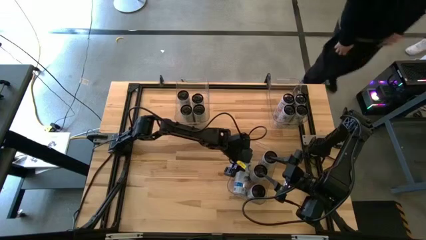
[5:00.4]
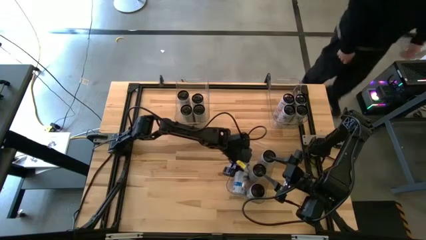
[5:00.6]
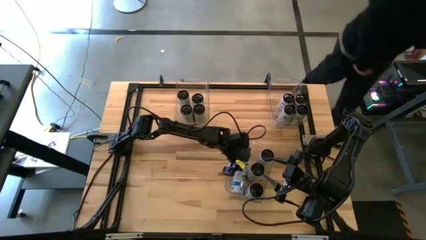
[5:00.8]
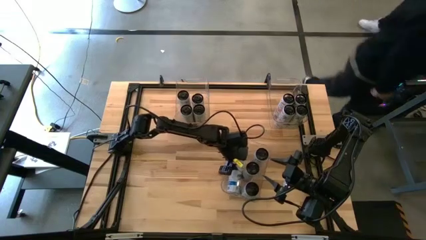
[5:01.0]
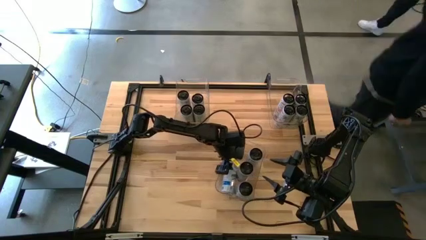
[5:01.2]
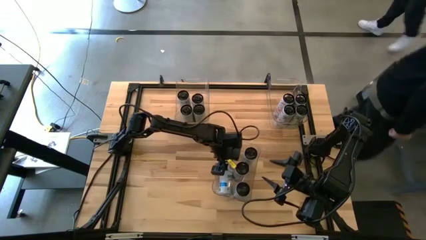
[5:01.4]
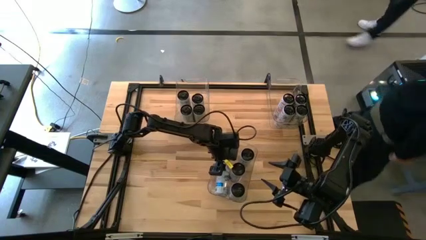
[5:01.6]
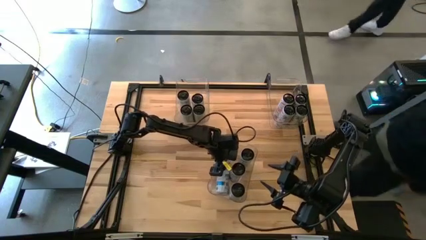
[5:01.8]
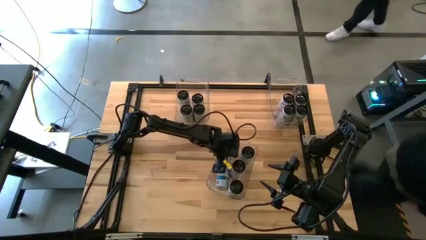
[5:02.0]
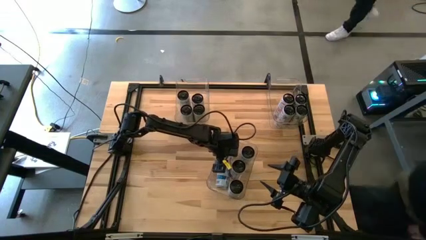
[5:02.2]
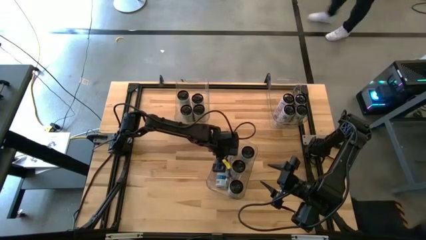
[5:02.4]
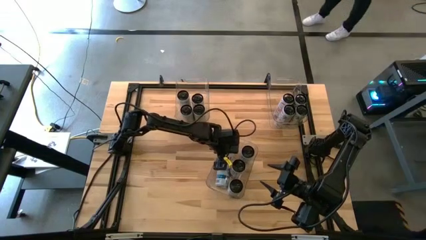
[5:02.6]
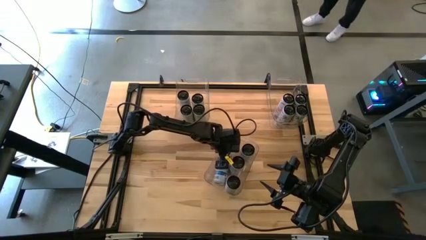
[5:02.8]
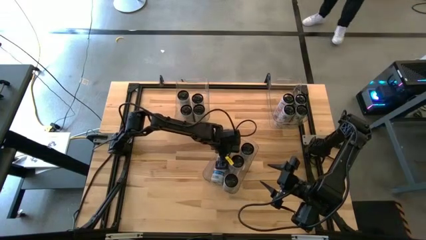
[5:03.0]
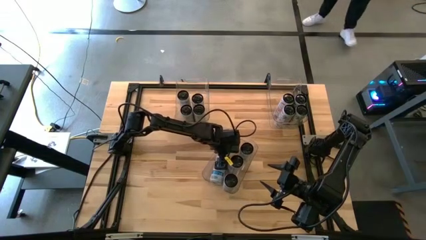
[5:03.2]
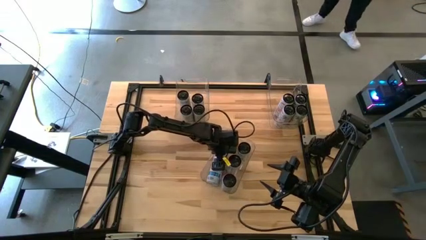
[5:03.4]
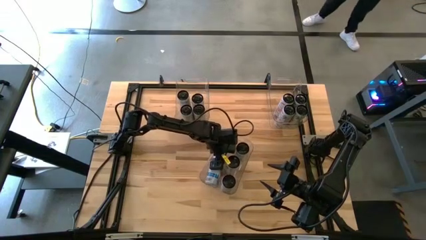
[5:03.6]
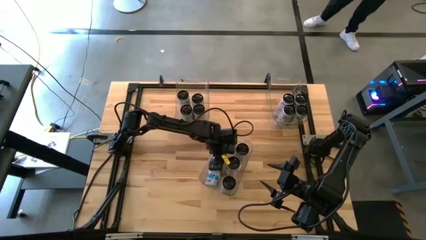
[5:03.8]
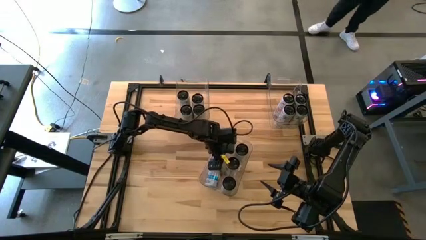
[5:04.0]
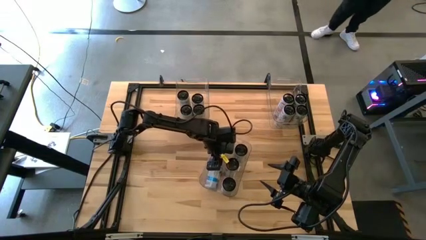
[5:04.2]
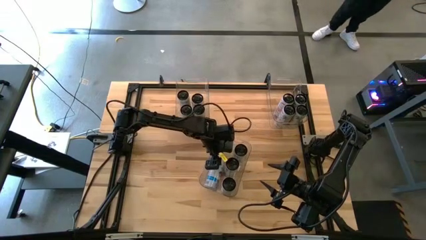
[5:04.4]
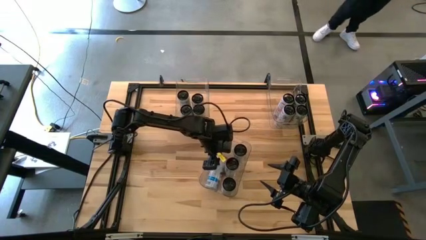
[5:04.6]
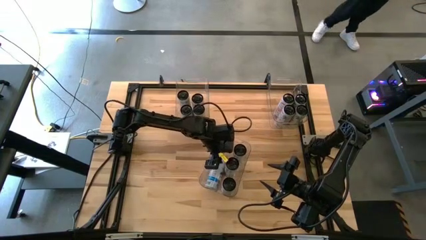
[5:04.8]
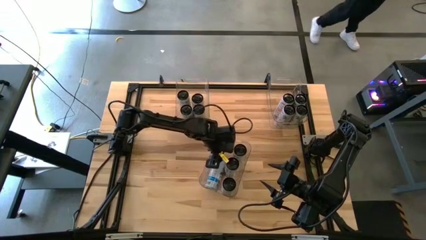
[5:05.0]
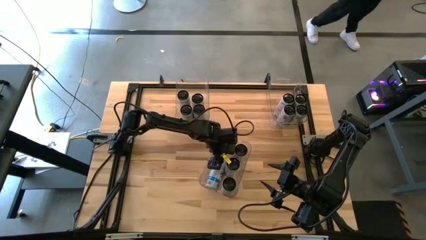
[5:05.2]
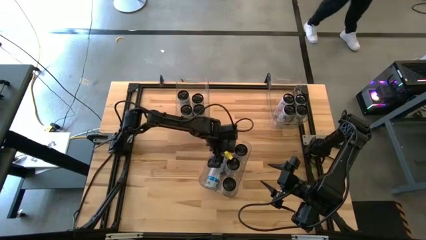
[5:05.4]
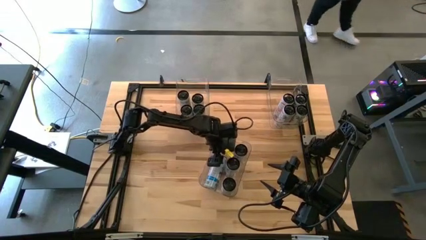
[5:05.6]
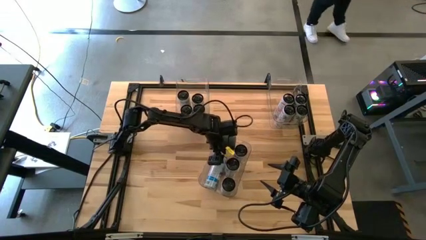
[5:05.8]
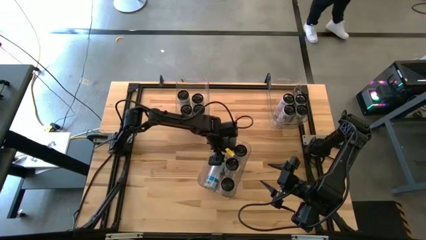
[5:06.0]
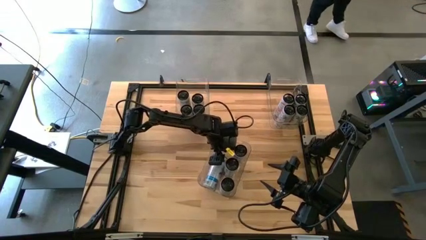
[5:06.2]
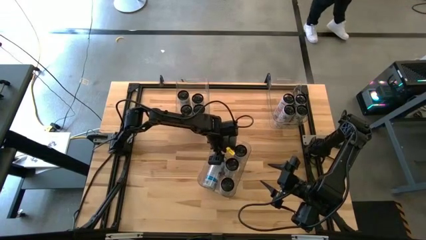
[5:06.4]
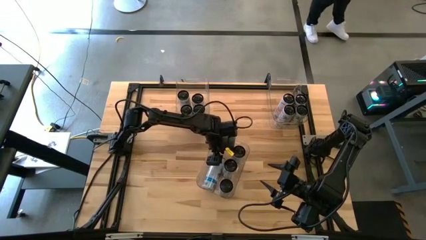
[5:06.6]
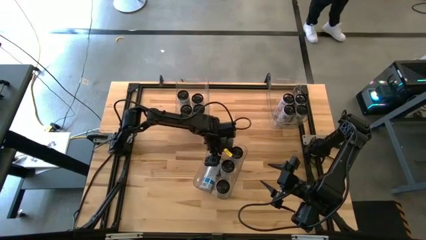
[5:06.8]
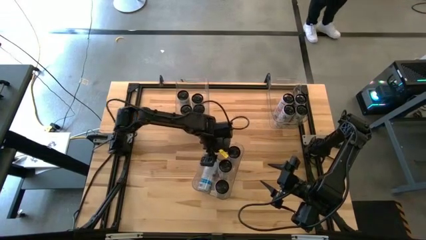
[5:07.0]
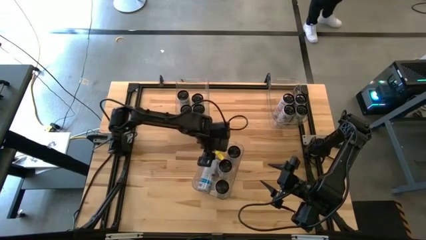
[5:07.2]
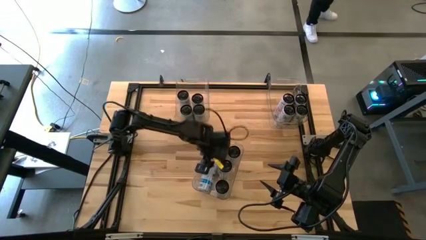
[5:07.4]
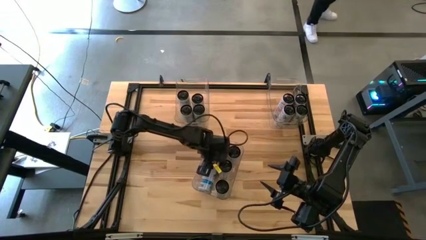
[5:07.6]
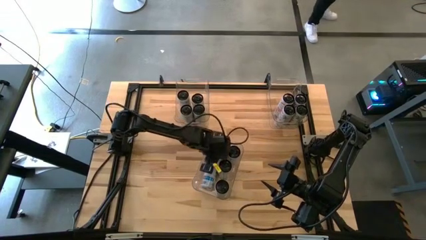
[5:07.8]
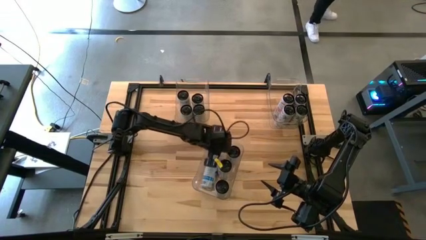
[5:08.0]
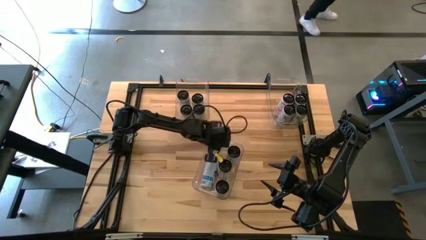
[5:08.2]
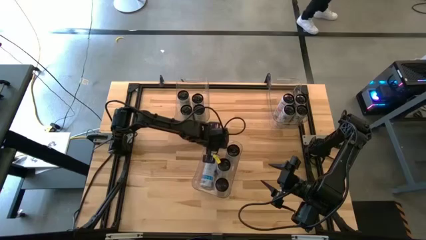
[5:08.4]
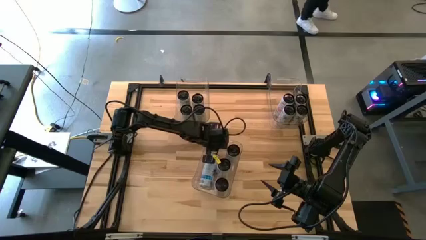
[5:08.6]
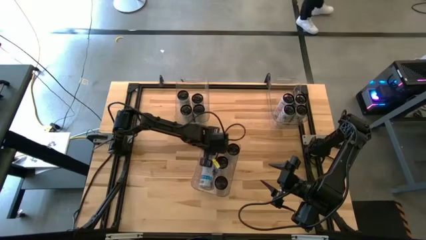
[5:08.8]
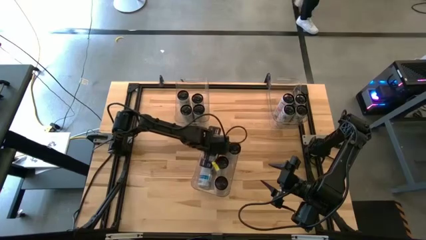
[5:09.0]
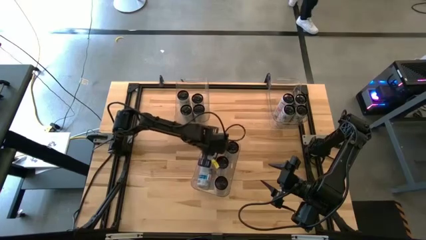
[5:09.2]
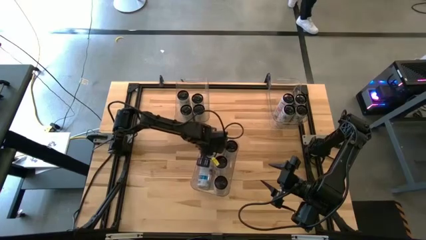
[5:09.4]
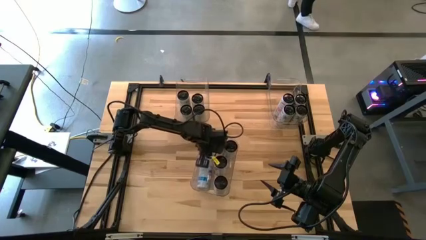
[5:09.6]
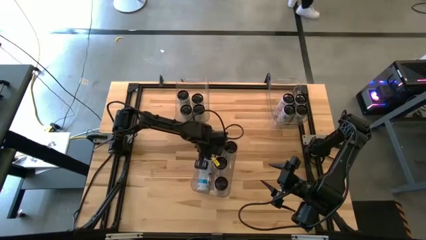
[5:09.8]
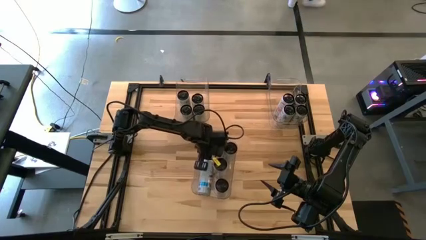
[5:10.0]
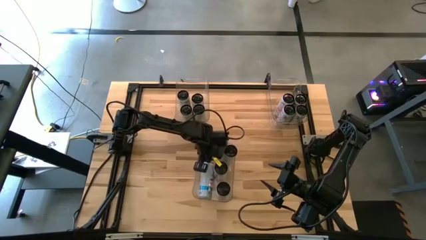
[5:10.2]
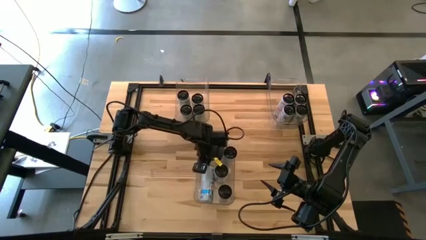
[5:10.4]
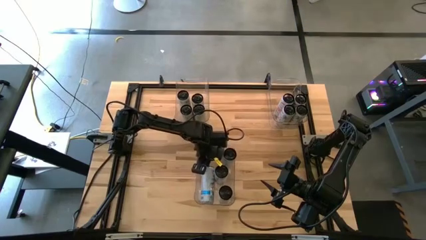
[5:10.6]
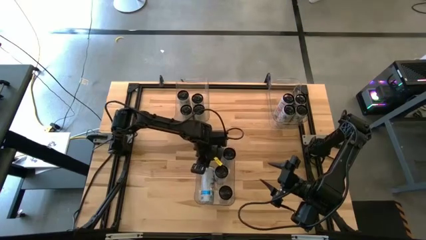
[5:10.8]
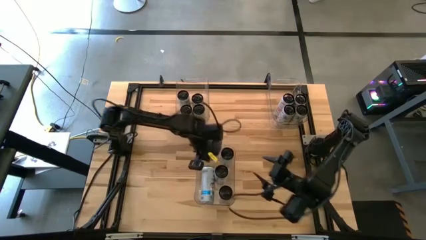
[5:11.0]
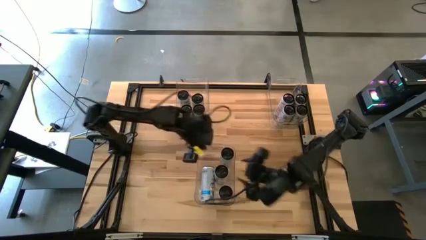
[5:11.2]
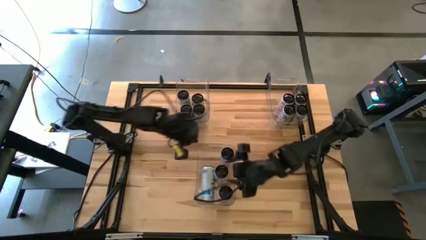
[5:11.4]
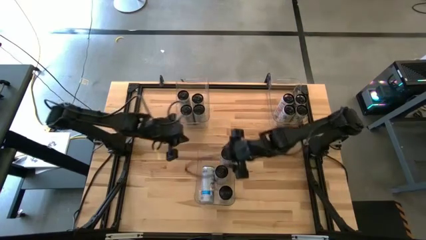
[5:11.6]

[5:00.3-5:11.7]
Task: Sort soda cans
Adjust the white/blue soda cans

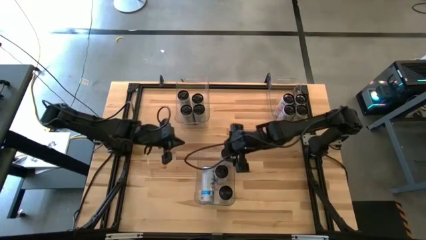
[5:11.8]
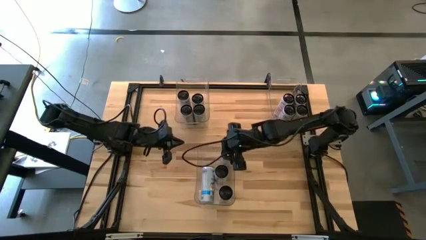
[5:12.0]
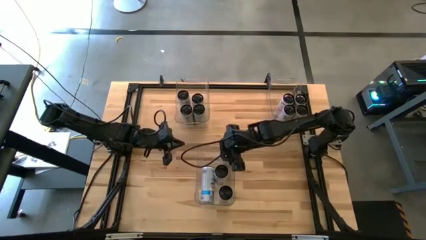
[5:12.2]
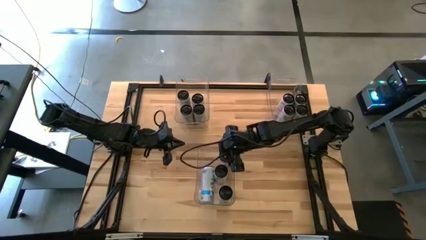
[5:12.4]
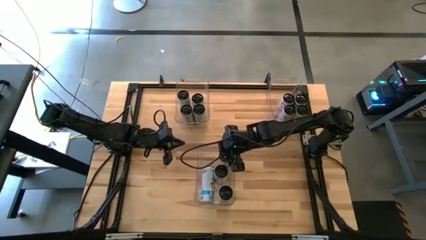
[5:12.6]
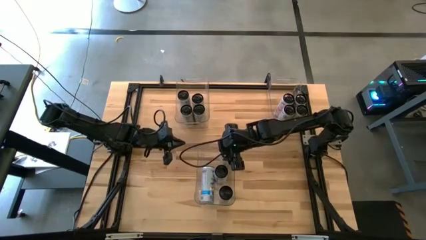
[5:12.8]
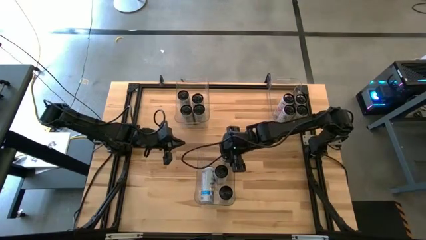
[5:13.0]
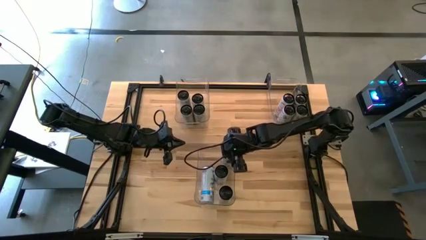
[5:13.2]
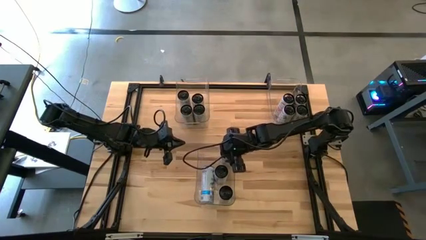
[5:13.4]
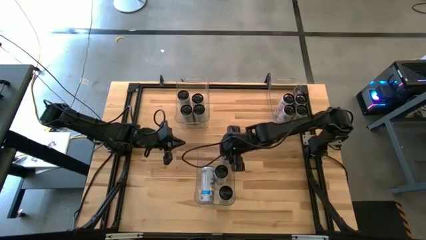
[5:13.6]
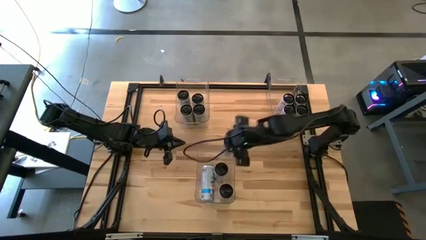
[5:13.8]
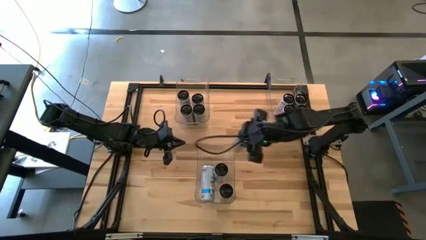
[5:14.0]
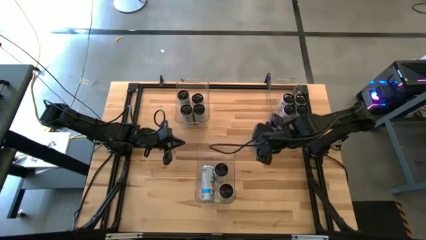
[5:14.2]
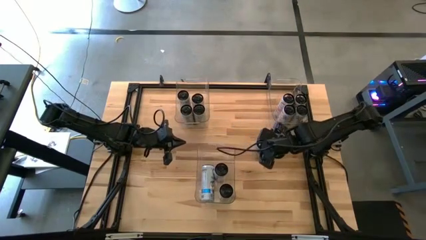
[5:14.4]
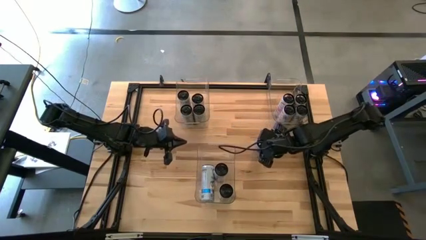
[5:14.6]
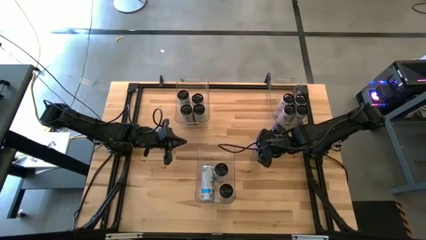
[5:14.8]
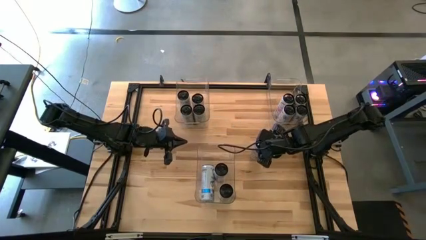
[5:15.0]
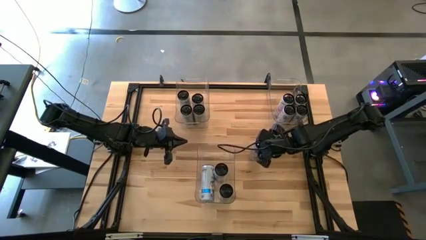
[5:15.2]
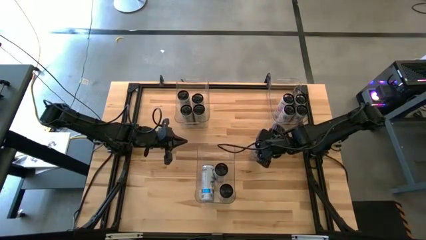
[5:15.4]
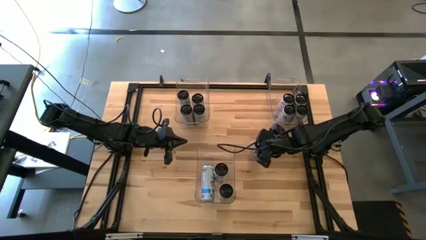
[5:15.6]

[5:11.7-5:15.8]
Remove the white/blue soda can from the transparent bin

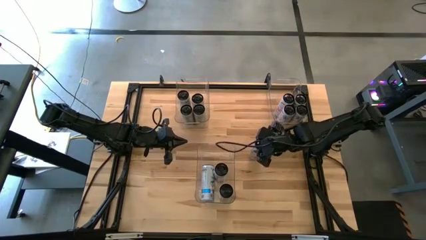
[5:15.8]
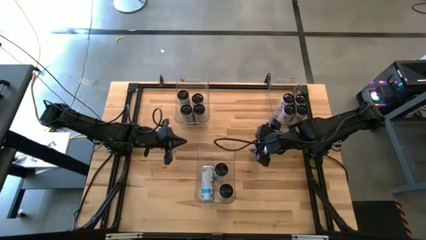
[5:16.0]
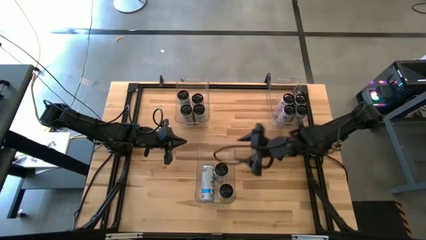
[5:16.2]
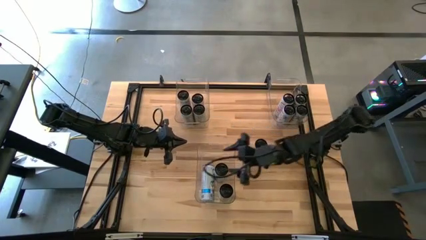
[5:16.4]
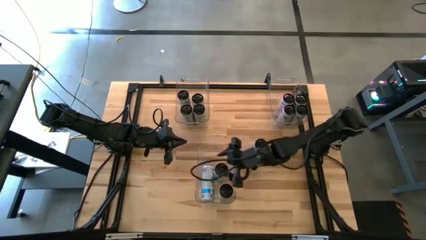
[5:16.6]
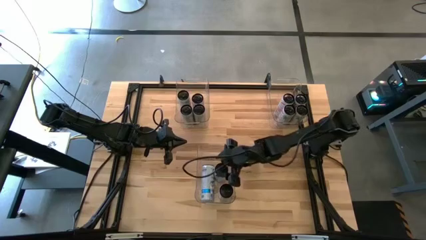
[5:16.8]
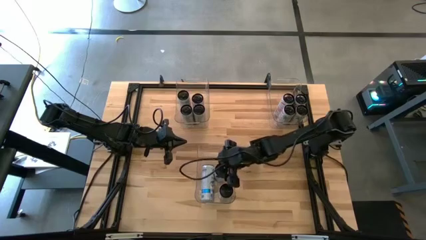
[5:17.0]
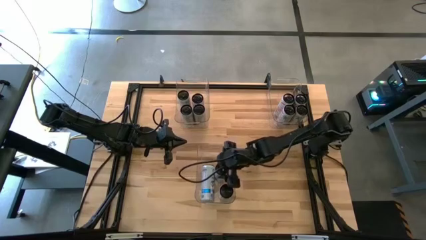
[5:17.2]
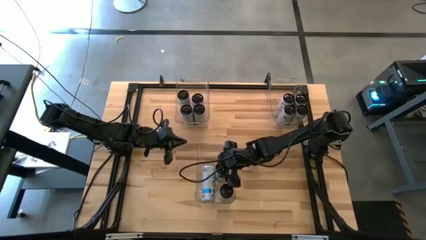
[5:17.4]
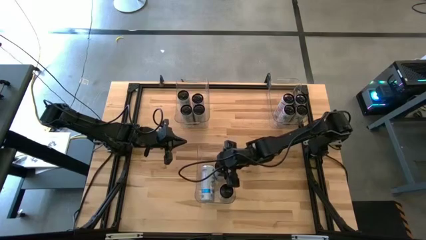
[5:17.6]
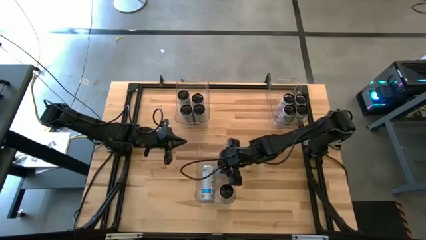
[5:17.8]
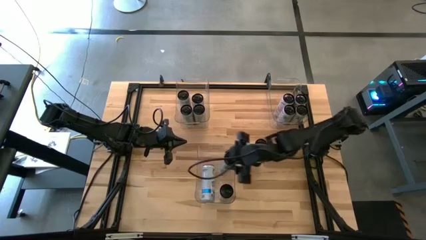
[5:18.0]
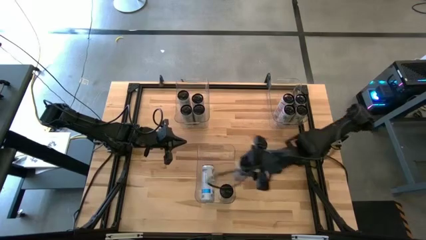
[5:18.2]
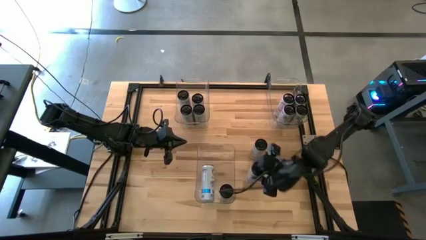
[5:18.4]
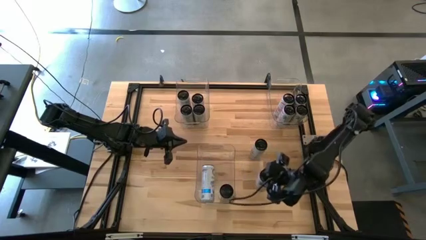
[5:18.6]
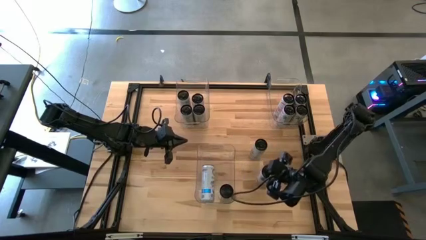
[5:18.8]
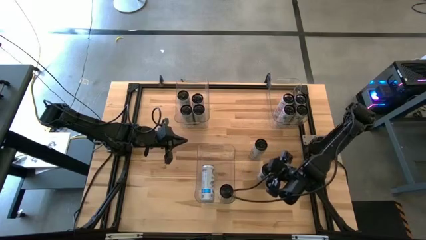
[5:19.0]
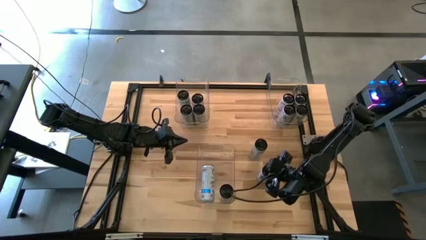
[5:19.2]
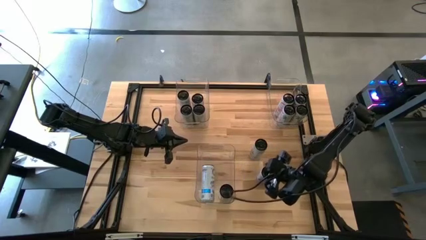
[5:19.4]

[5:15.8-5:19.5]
Remove the white/blue soda can from the transparent bin
